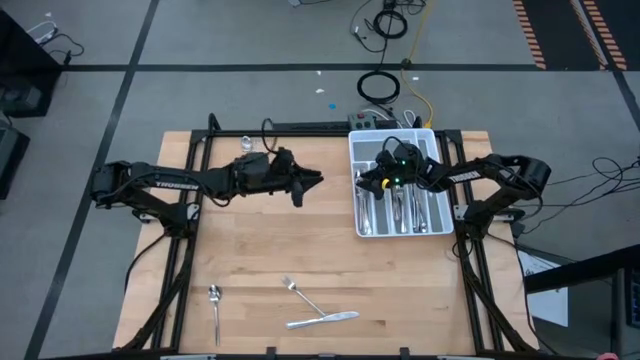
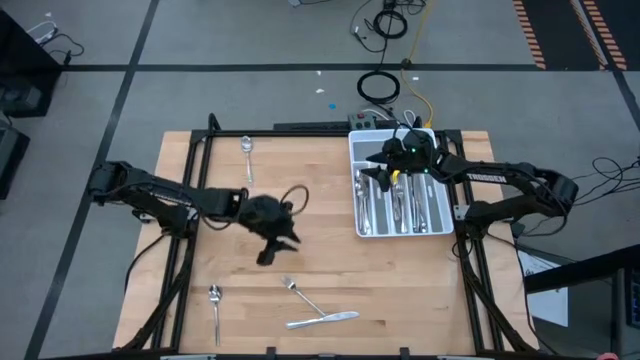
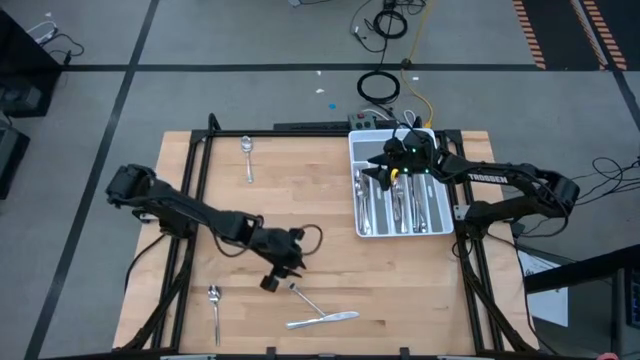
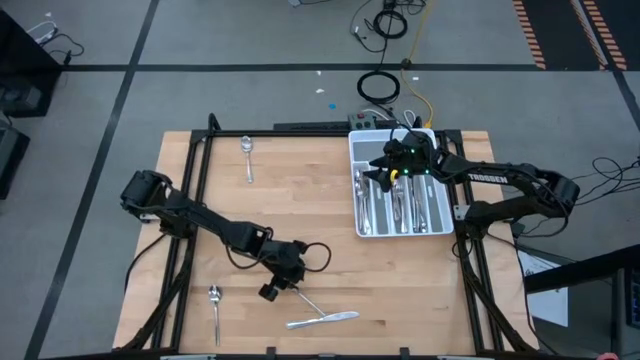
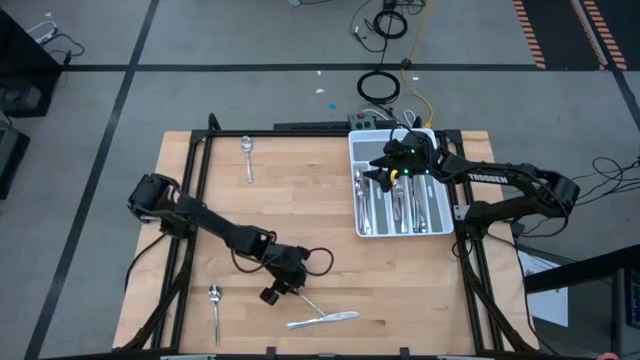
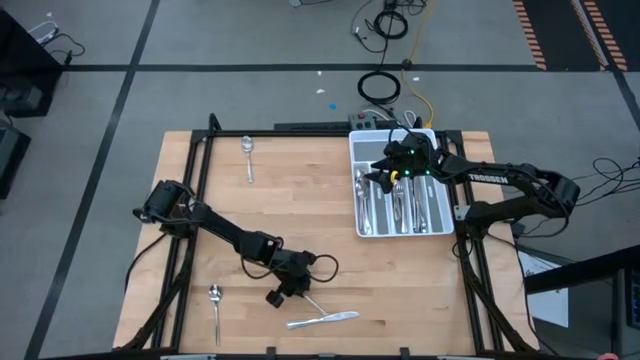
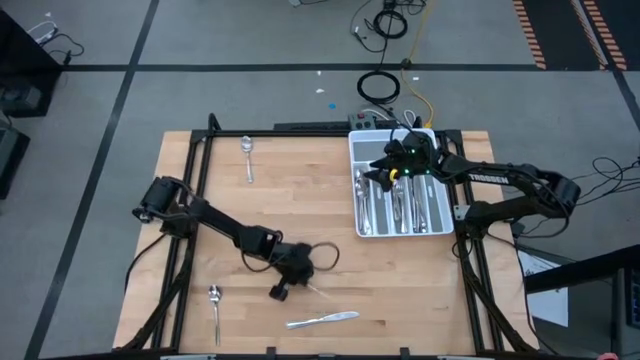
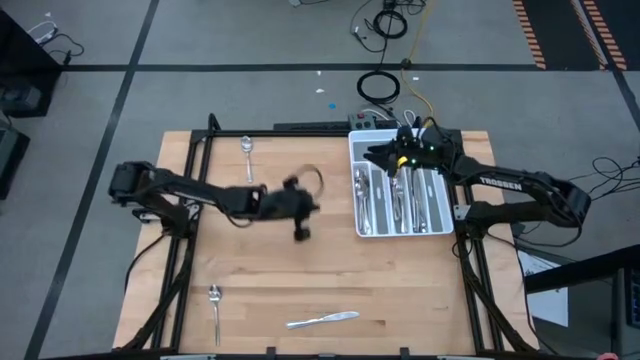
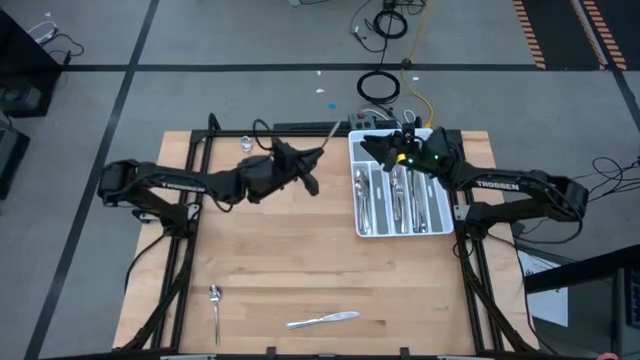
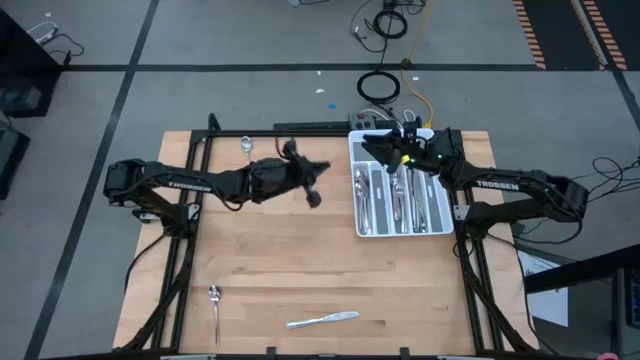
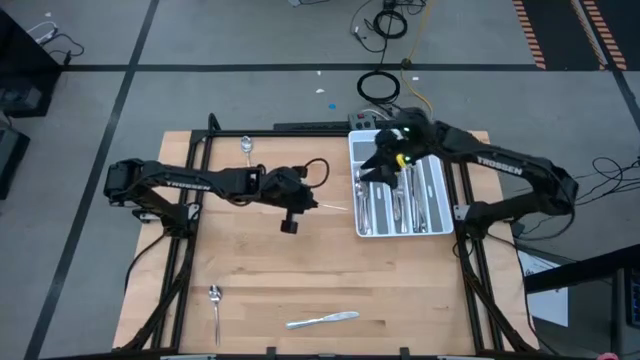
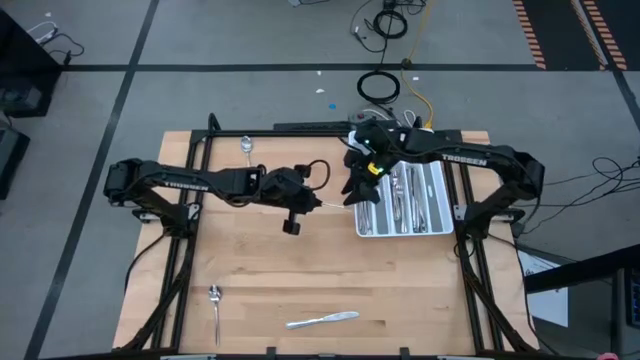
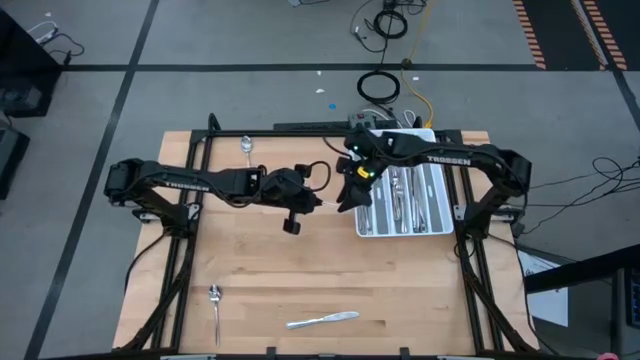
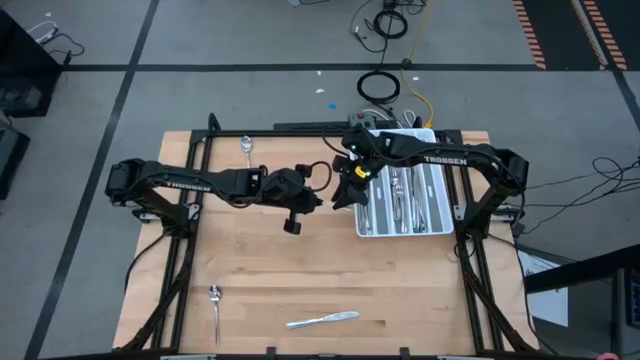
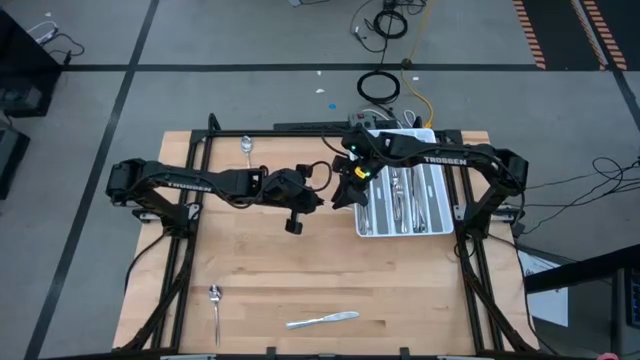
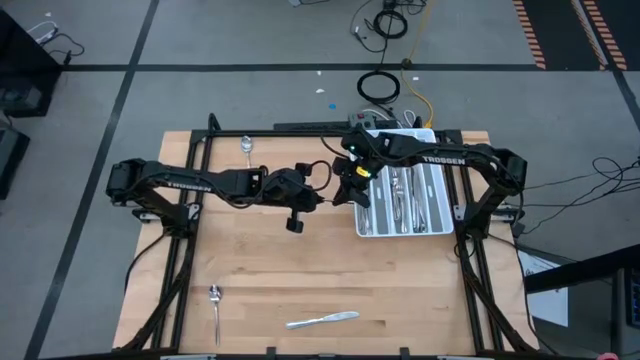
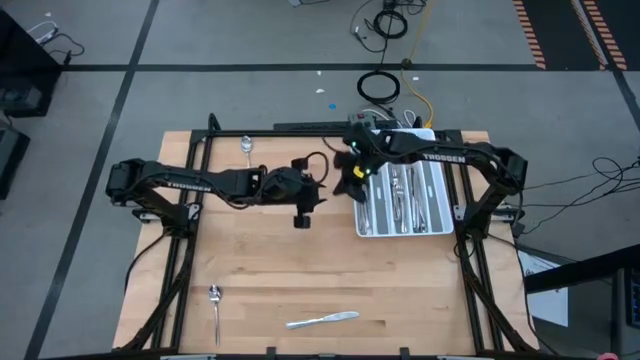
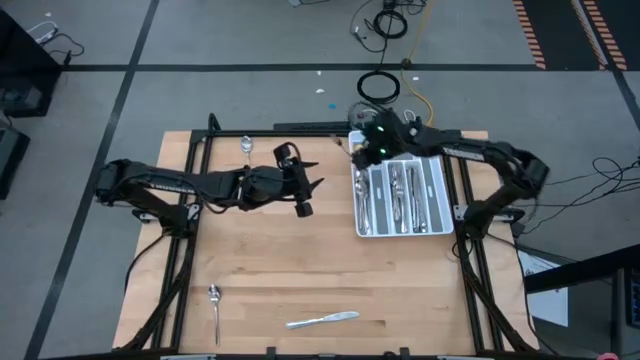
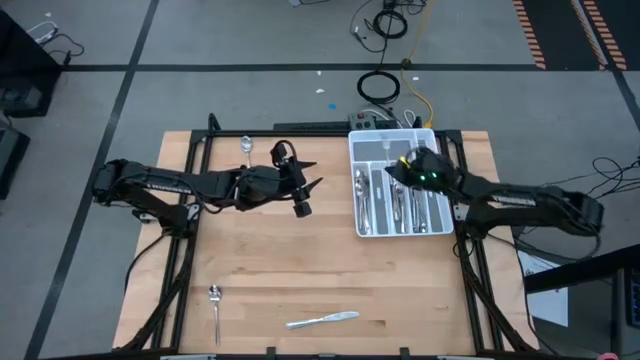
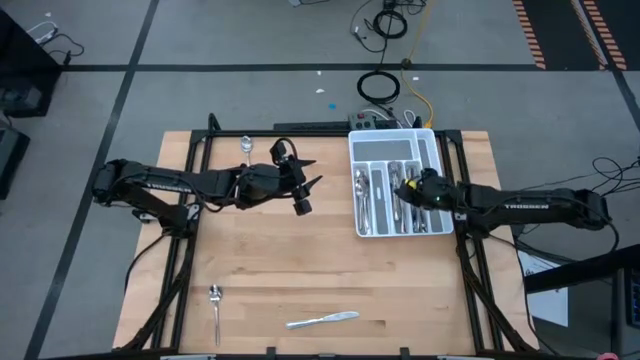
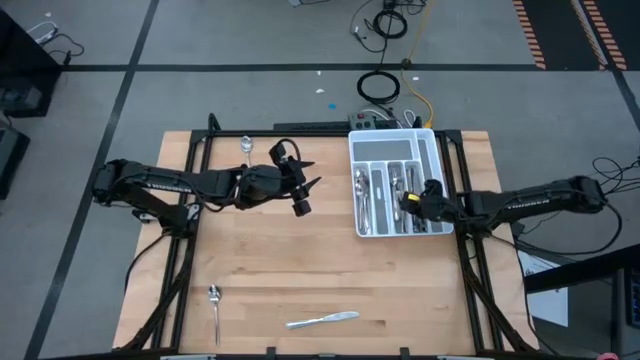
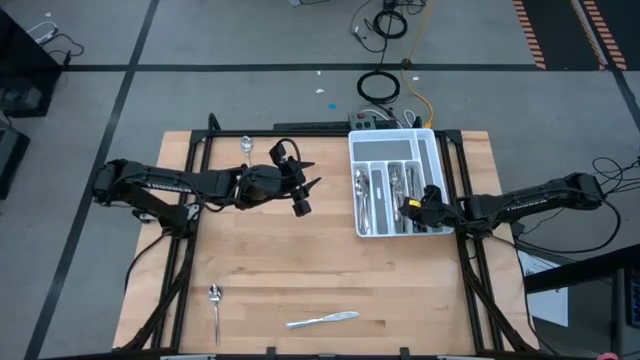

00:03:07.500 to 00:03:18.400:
Task: Sort silverware
Put the silver fork into the white silverware tray

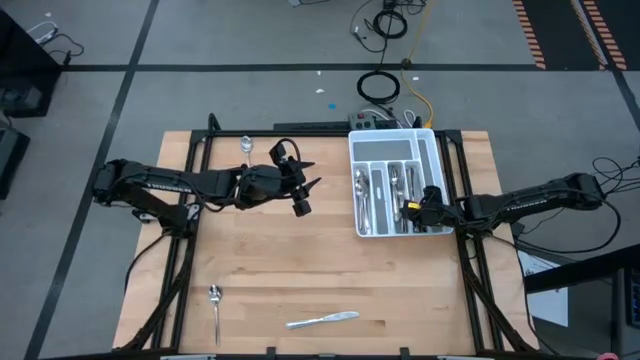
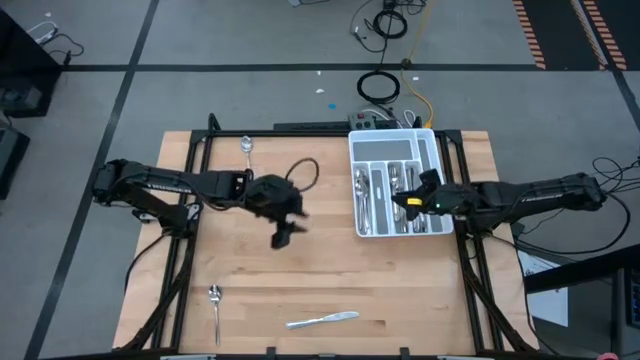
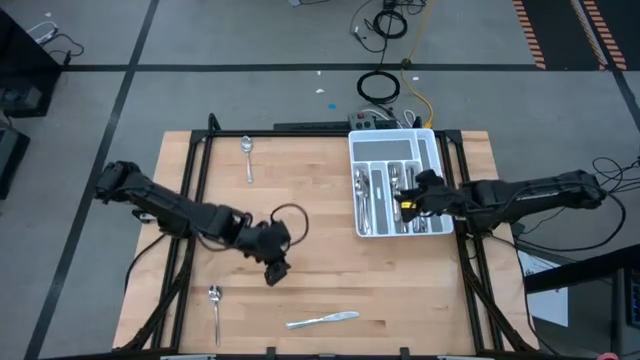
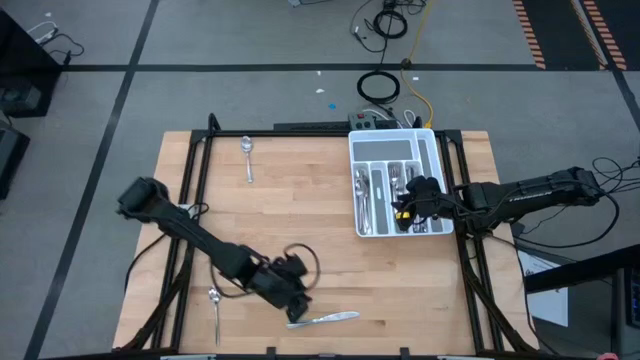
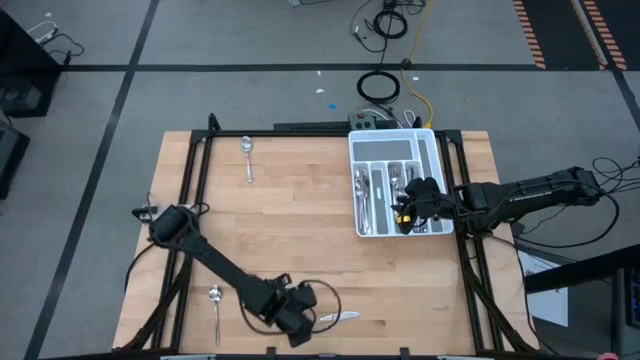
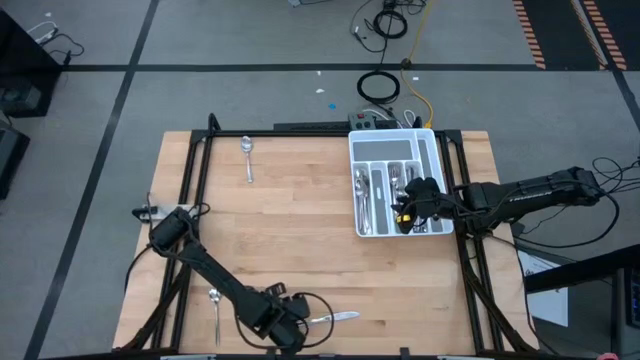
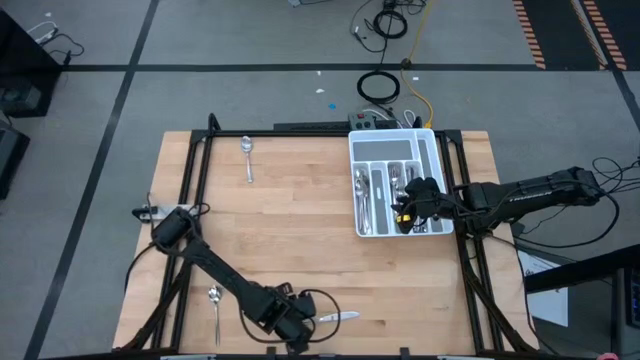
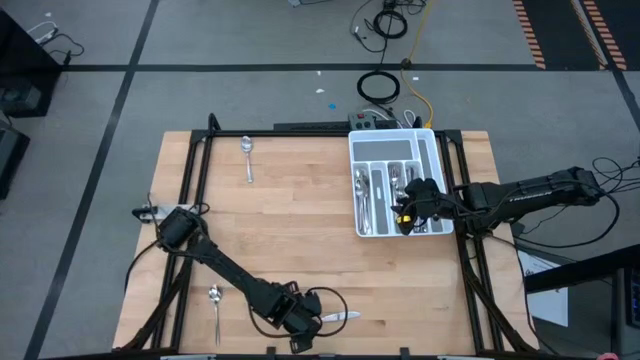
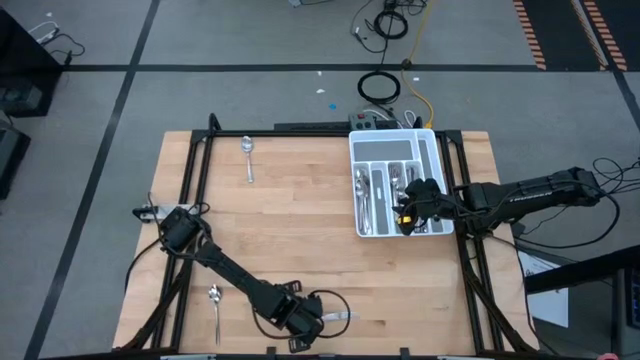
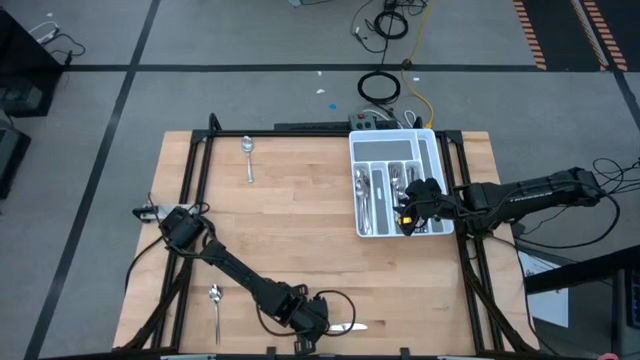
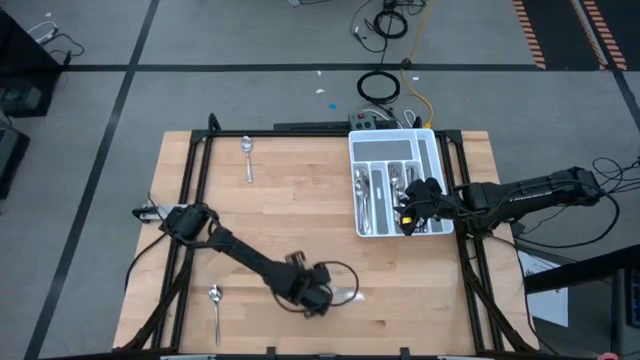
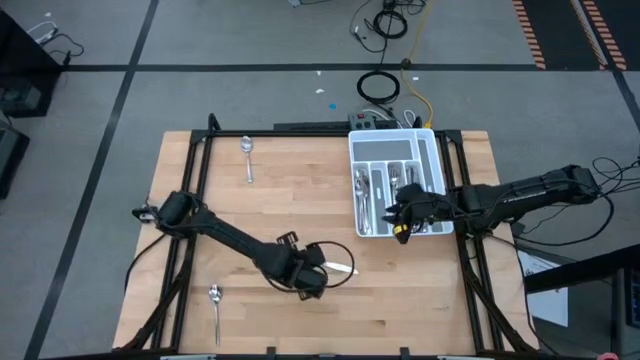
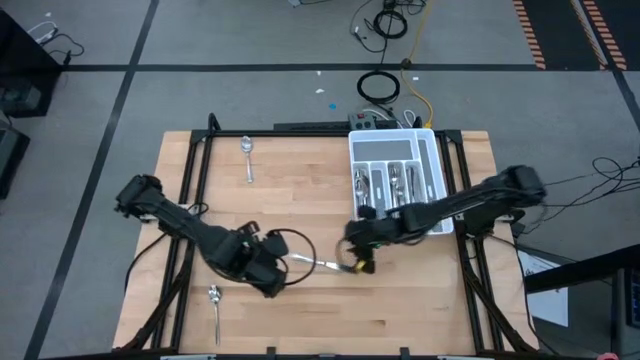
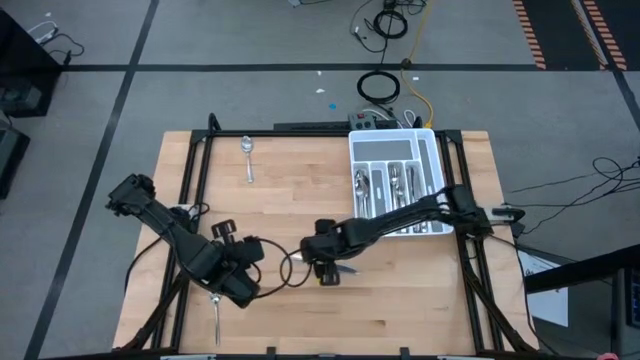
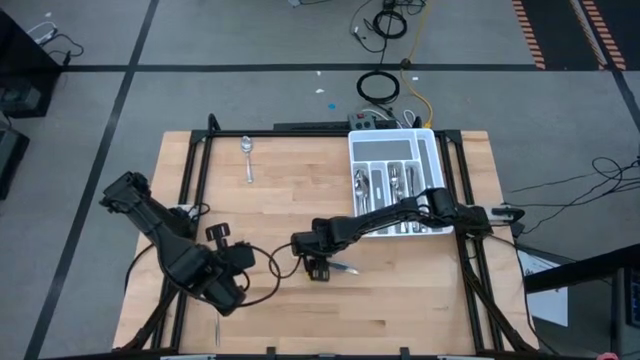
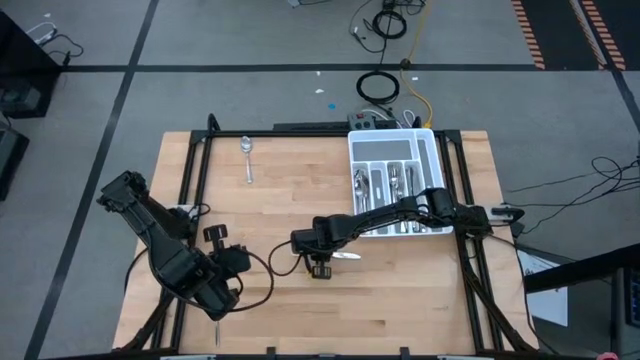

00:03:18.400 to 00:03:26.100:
Put the silver knife into the white silverware tray

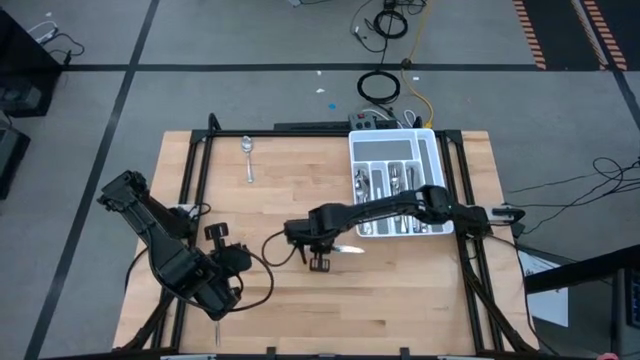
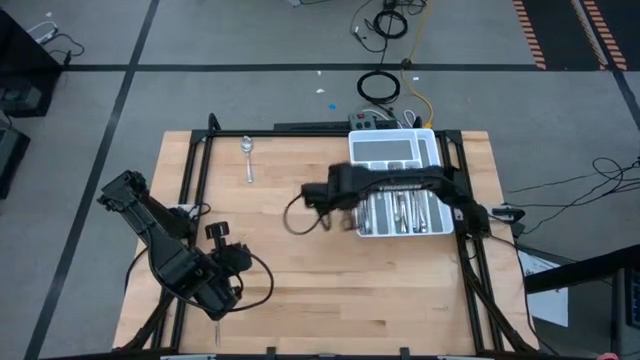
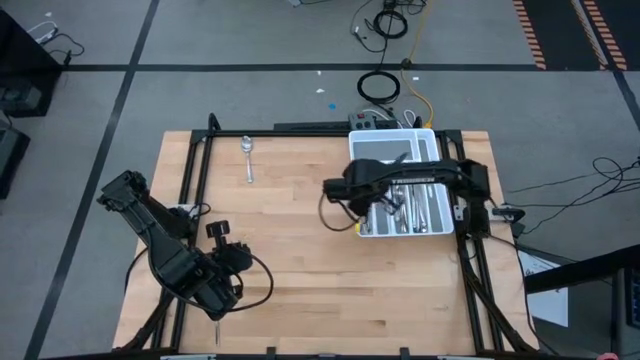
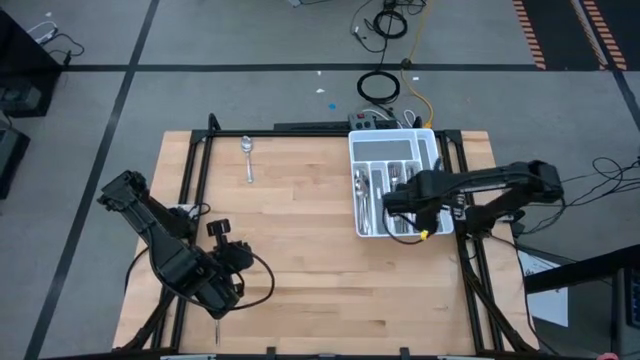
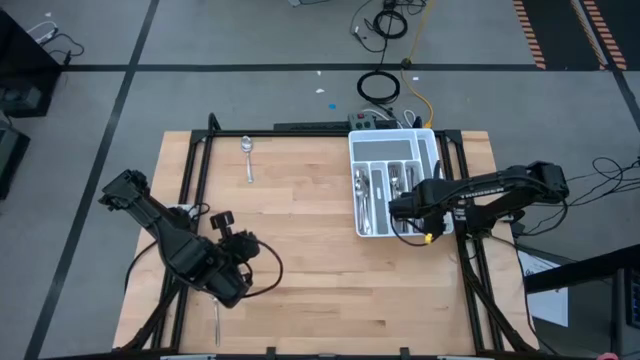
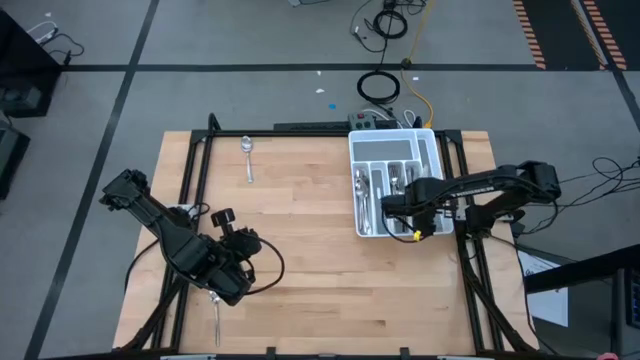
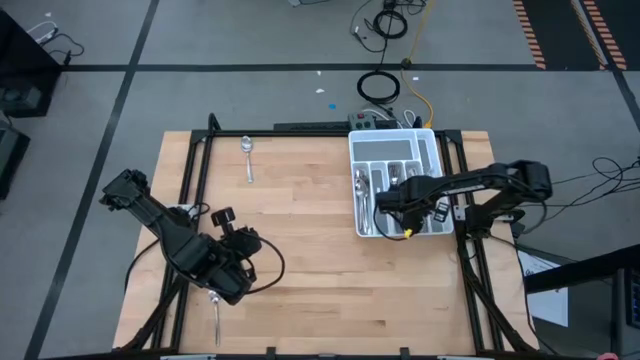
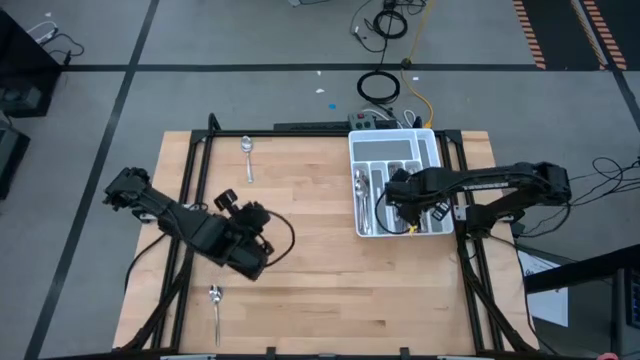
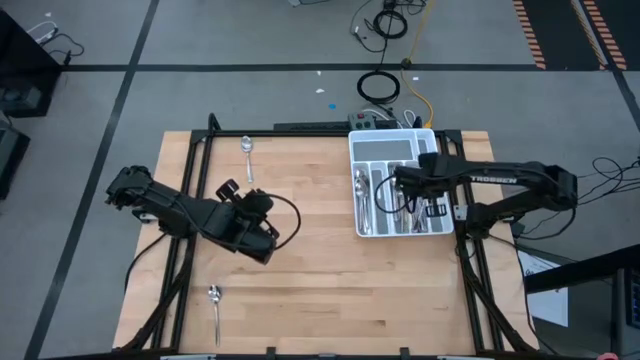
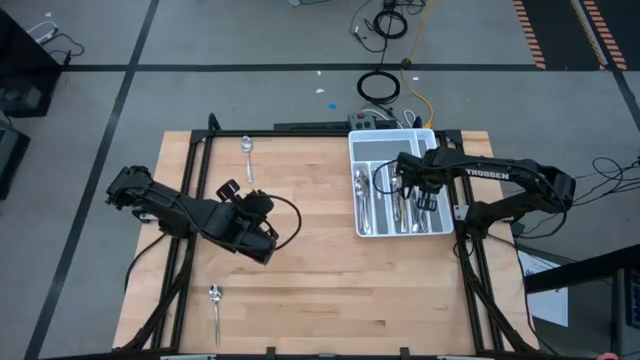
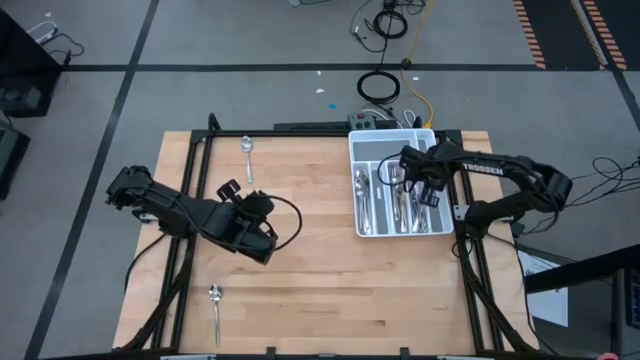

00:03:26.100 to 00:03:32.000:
Put the silver knife into the white silverware tray
